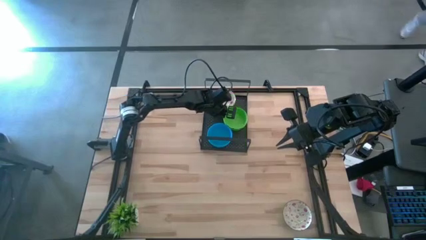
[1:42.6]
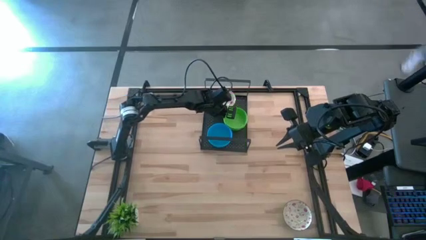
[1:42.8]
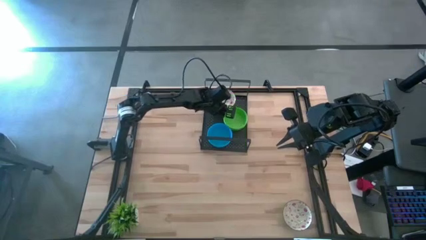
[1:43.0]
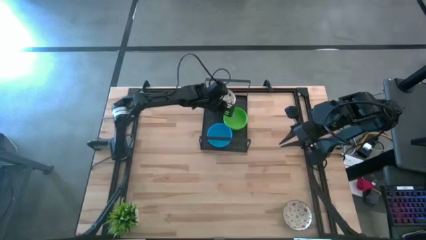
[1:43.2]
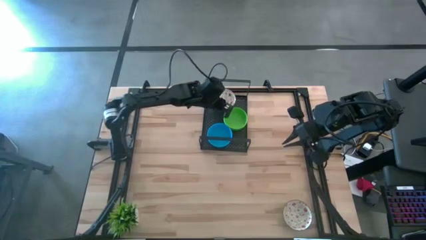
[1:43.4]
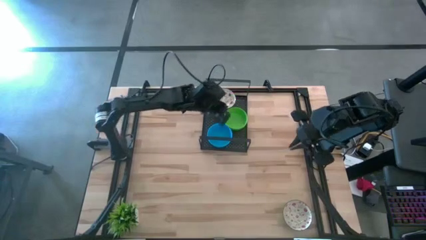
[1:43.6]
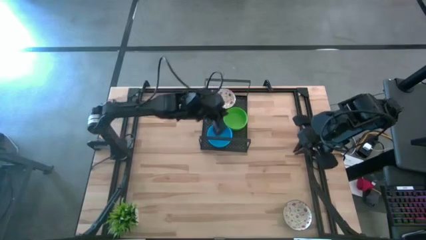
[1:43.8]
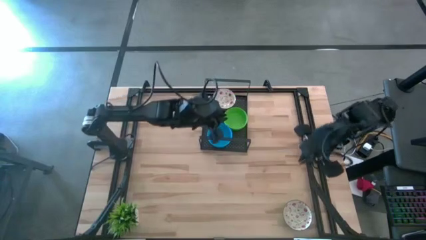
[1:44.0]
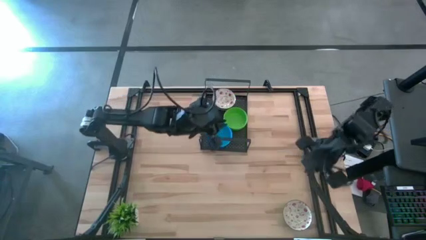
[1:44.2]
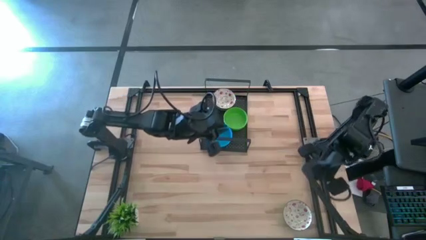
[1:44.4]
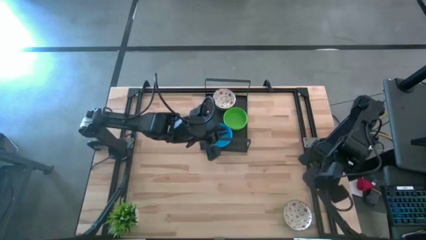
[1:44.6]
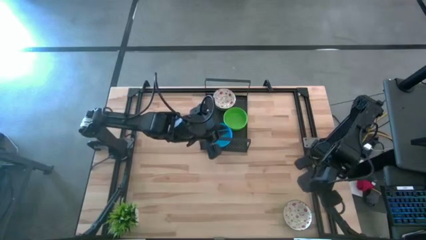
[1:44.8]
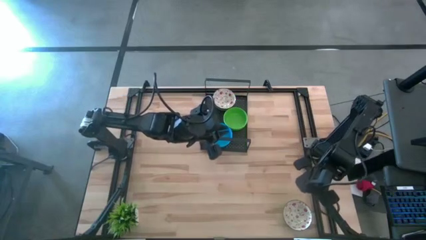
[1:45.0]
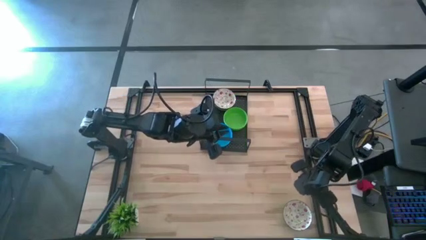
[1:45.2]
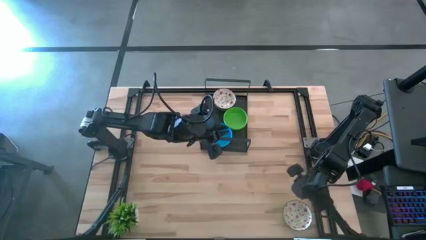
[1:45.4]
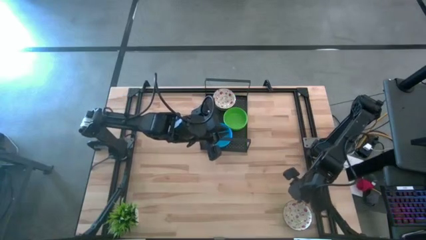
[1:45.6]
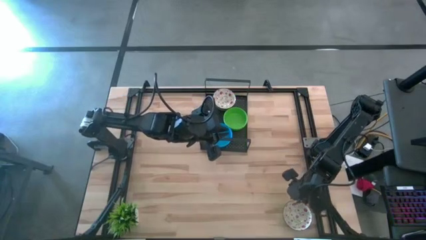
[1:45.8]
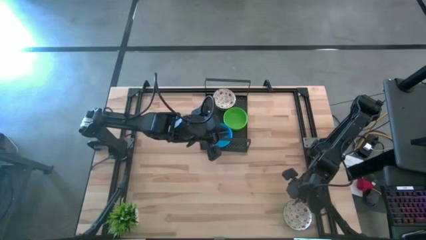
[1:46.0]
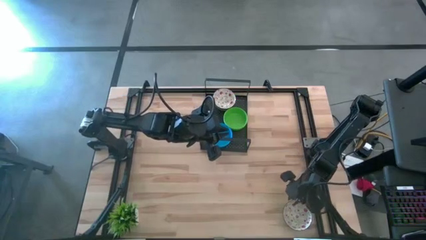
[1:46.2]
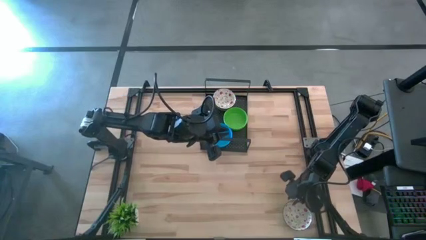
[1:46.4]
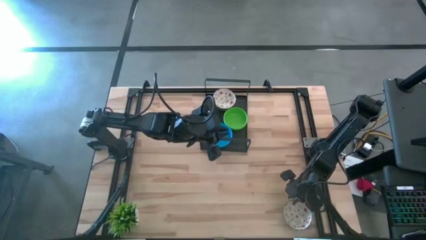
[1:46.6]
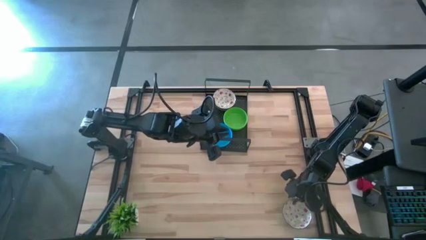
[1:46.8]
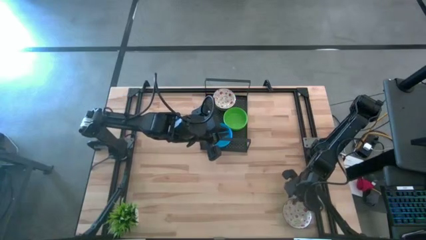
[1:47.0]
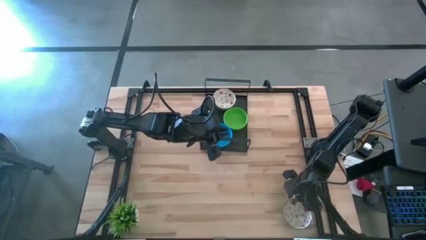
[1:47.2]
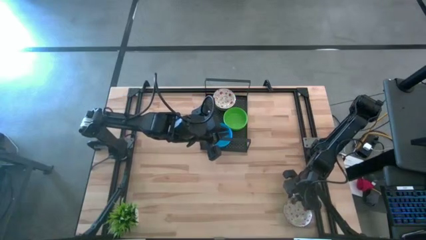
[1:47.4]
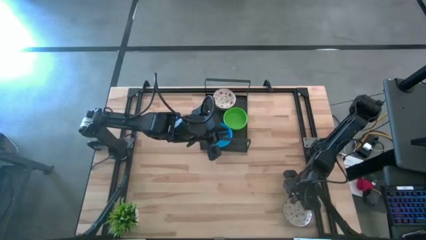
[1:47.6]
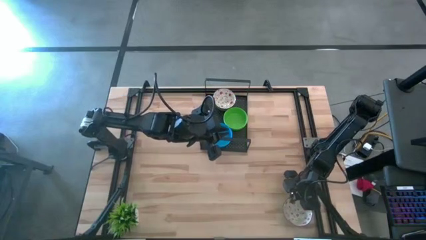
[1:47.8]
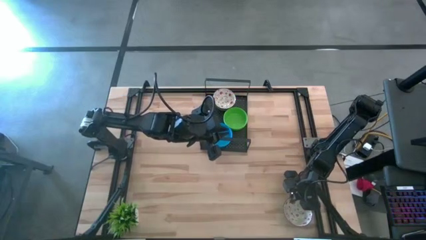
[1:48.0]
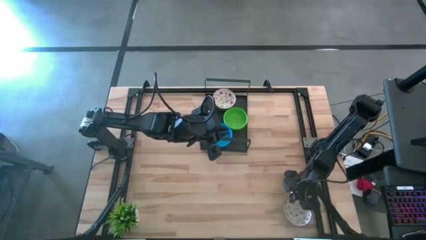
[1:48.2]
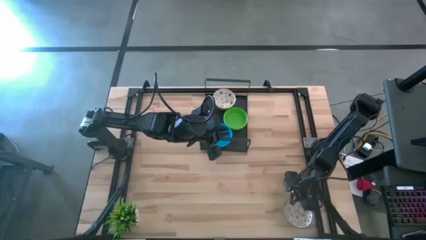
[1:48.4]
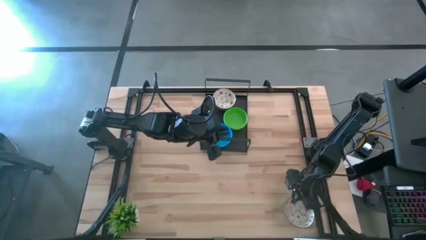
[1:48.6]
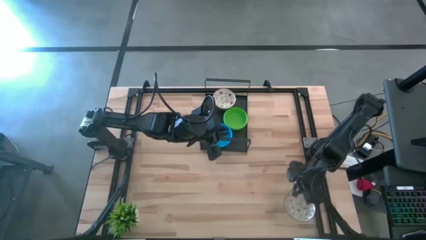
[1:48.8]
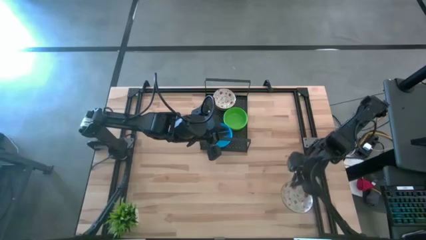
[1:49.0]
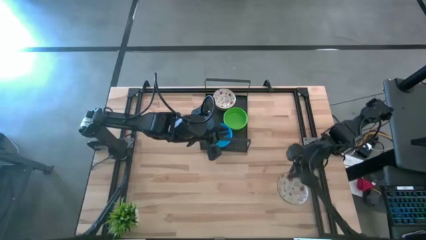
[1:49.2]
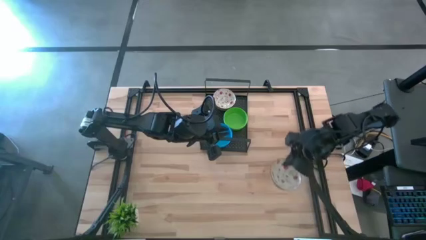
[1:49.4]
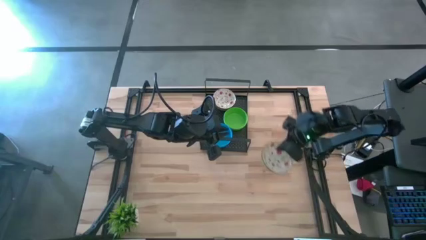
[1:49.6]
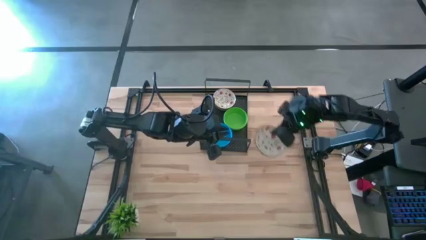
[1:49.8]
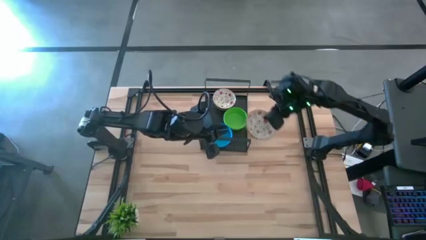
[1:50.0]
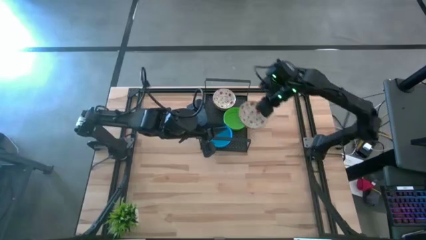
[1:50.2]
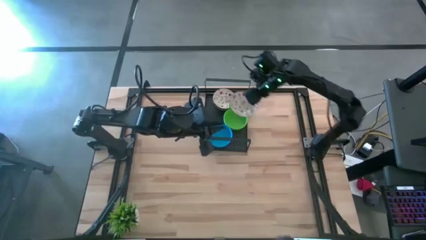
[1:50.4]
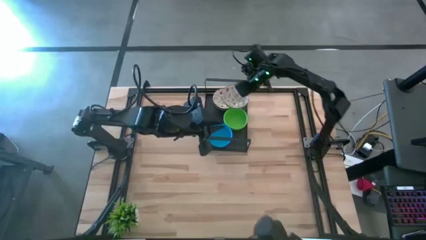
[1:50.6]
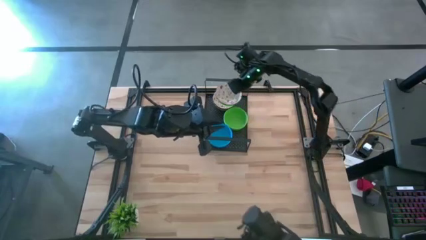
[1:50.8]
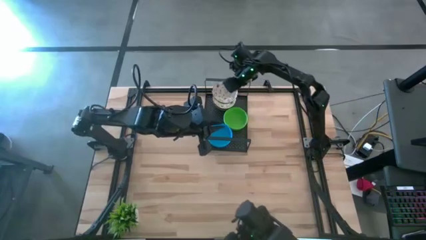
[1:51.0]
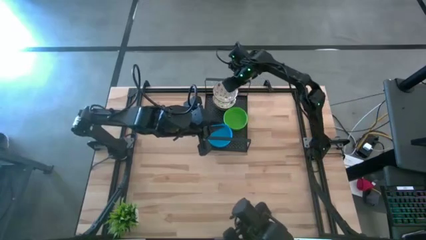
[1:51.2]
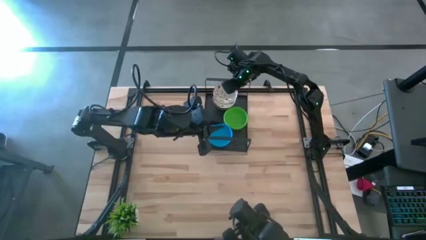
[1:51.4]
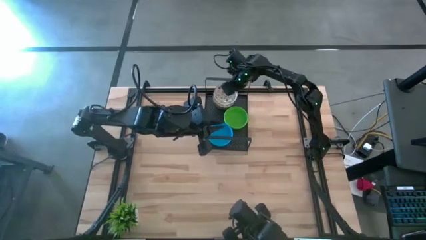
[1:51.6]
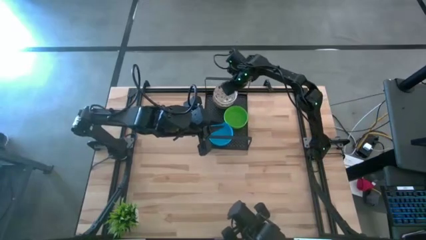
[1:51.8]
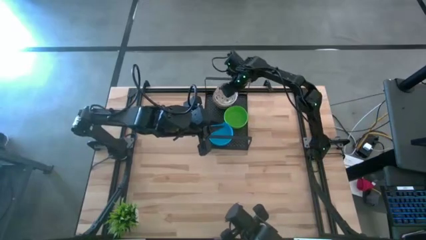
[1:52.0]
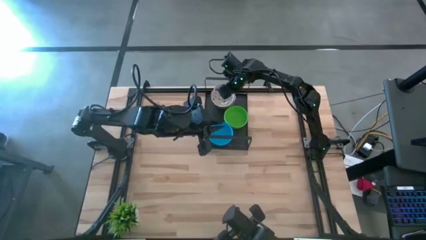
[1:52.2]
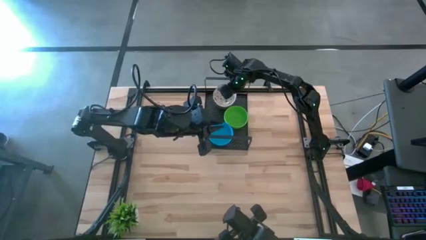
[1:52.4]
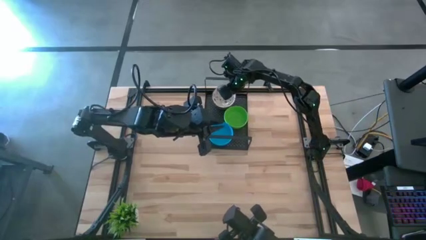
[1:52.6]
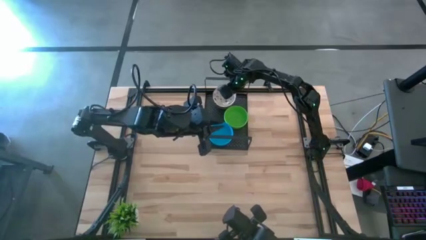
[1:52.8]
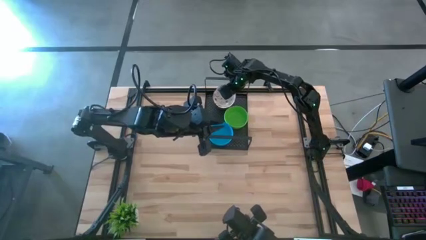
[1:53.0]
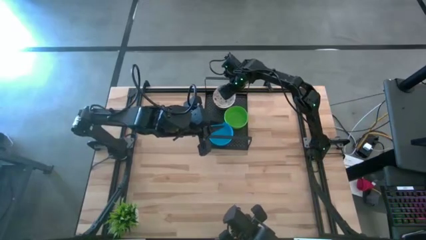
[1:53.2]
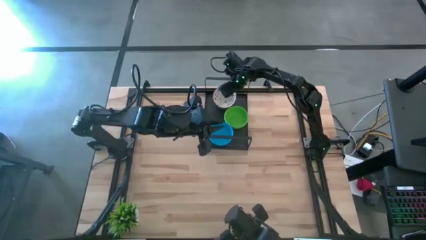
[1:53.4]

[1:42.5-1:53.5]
Task: Pick & Place Mini bowls
Stack the white bowl on the white bowl on the shelf

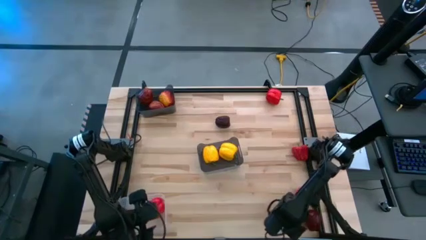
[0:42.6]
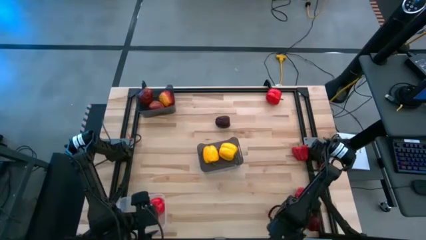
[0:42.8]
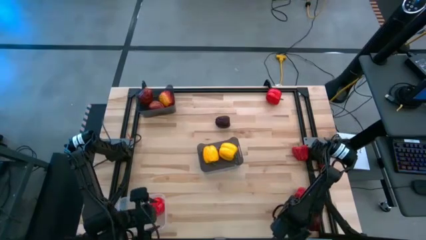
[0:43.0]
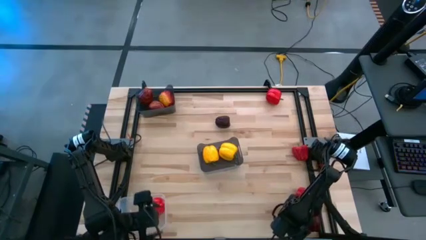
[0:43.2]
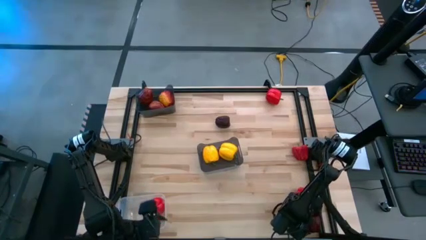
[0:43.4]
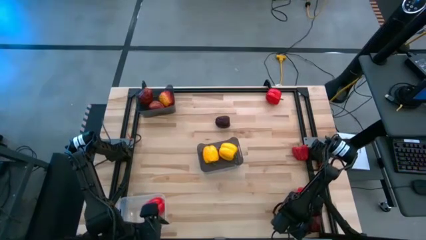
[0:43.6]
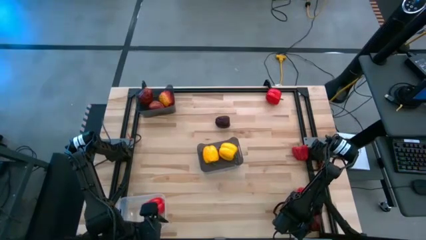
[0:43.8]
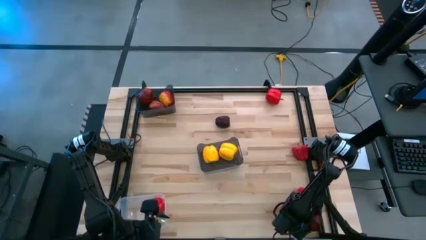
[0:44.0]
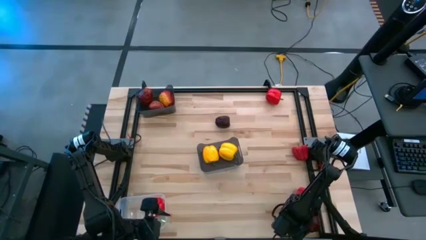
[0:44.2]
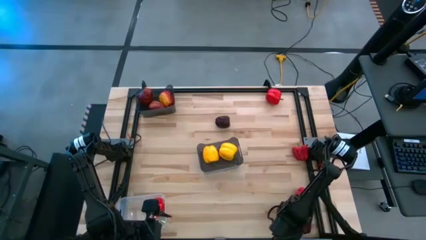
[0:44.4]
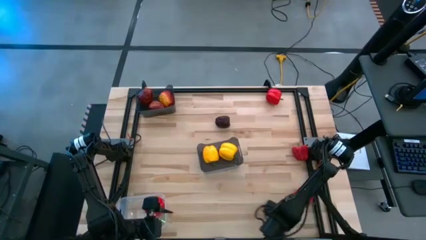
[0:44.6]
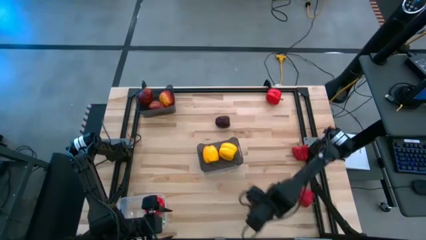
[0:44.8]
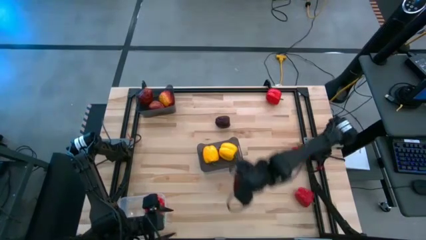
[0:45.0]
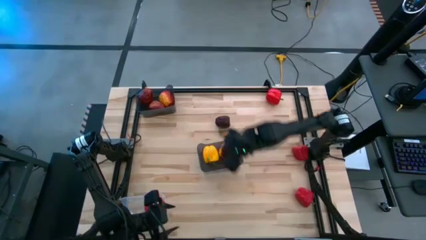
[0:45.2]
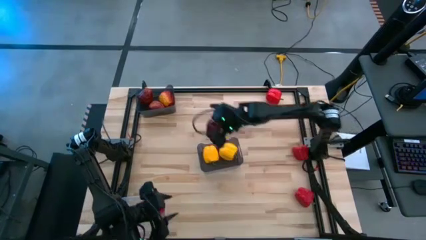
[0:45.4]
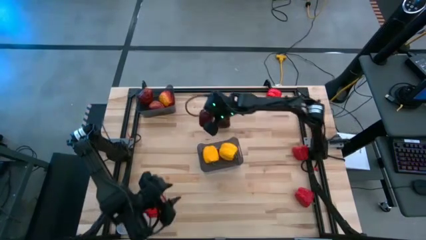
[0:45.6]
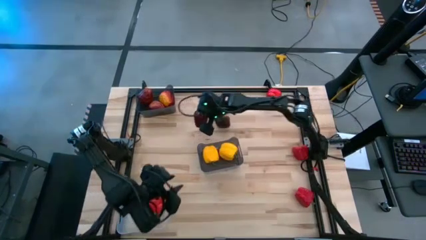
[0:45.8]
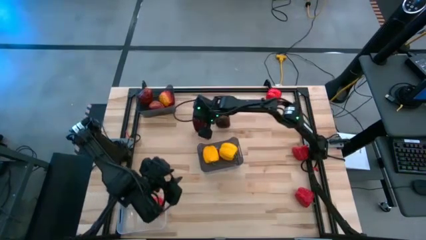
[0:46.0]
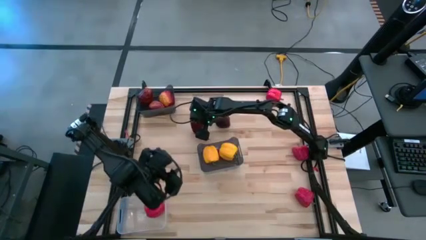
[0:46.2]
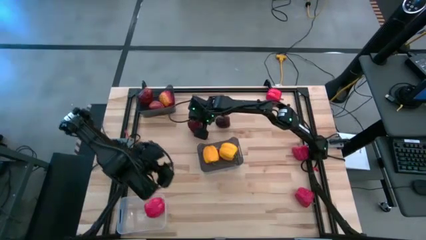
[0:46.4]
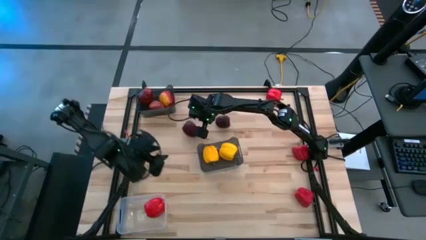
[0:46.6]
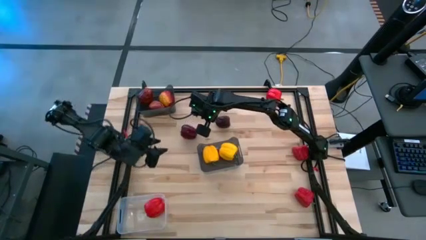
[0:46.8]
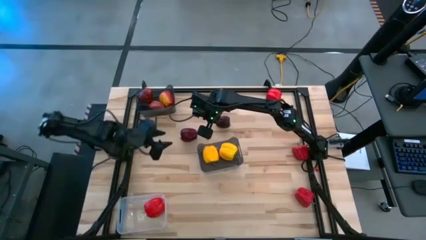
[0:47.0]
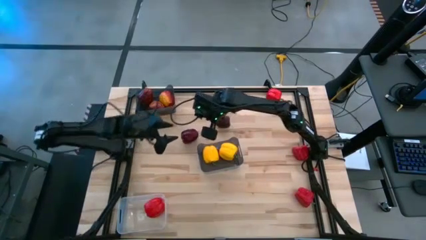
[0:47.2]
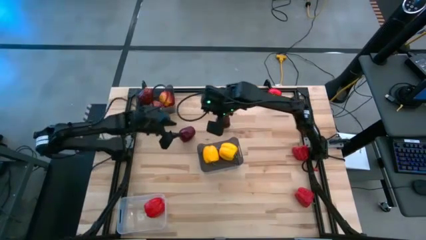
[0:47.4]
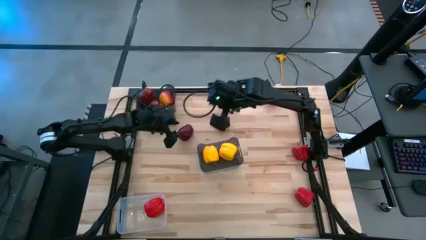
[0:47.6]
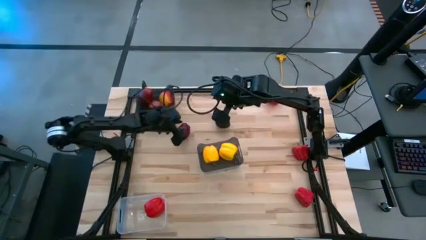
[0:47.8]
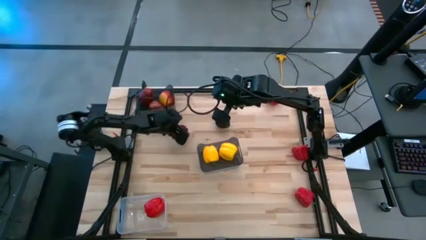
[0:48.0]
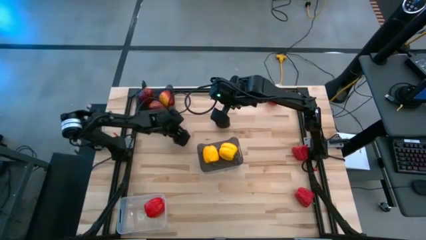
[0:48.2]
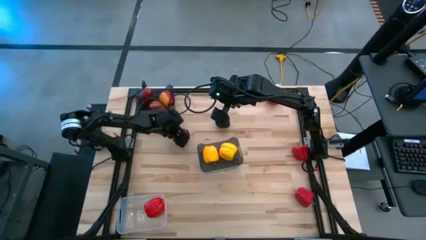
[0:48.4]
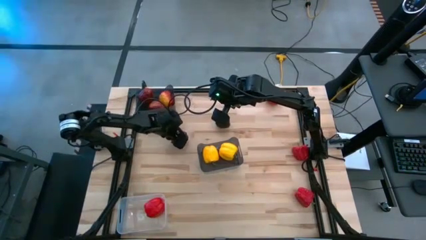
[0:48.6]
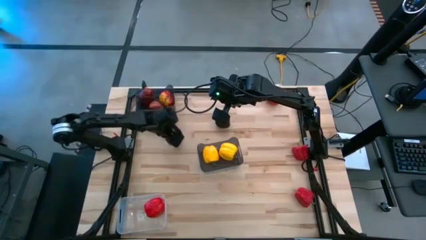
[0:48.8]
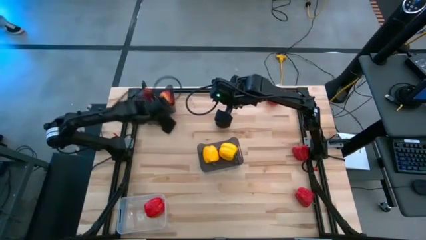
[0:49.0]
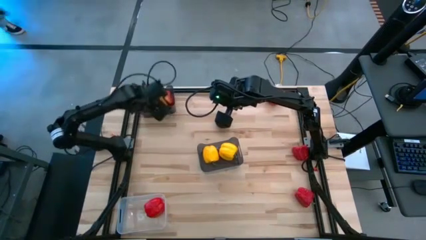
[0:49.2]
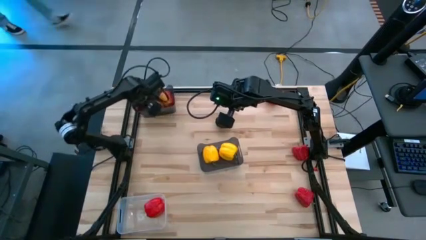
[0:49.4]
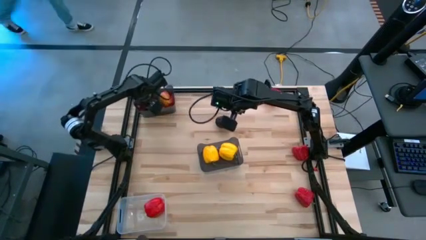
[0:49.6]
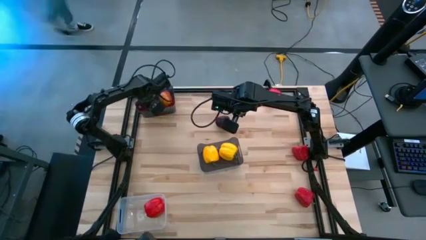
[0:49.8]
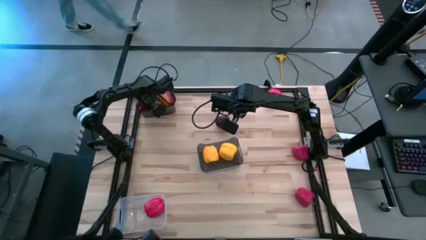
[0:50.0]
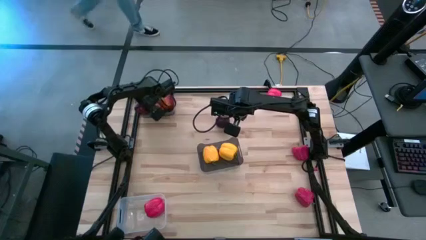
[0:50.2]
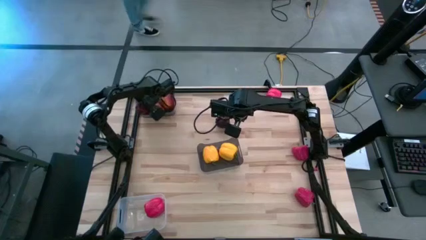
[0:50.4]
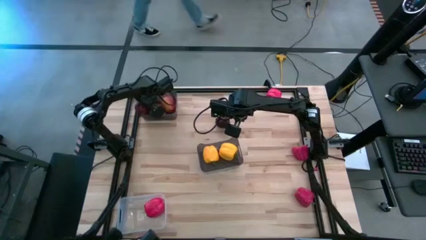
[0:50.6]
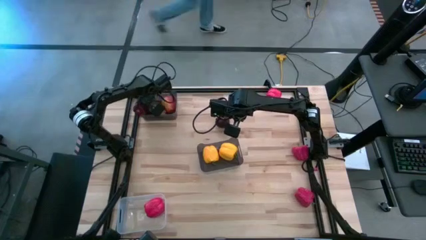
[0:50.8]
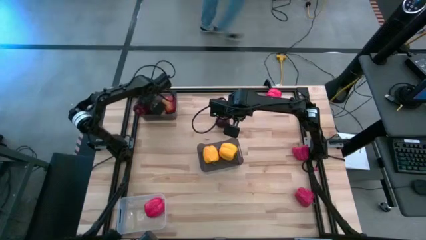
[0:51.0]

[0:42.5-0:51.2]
Task: Sort produce into baskets
Put the bottom apple into the top black bin
